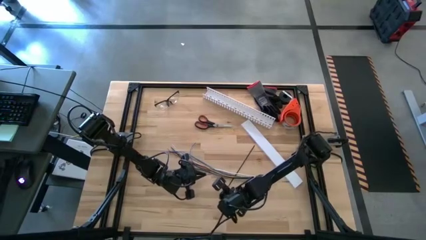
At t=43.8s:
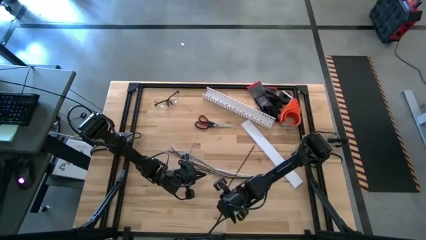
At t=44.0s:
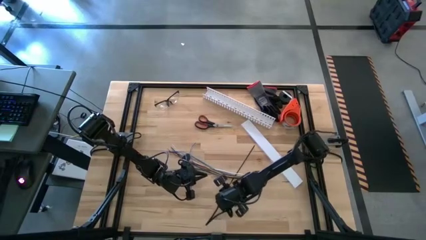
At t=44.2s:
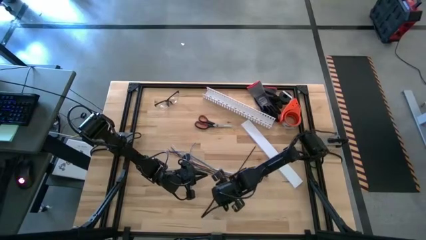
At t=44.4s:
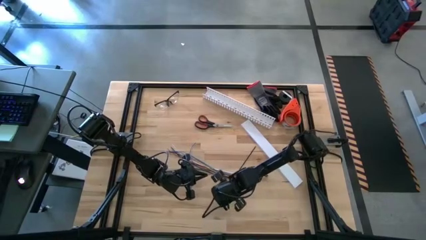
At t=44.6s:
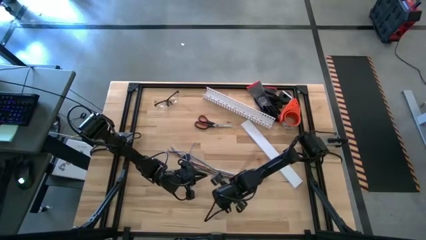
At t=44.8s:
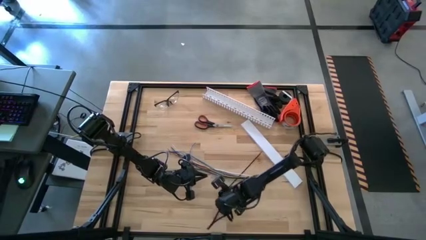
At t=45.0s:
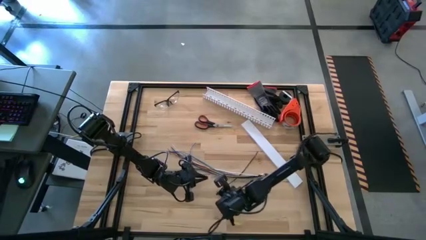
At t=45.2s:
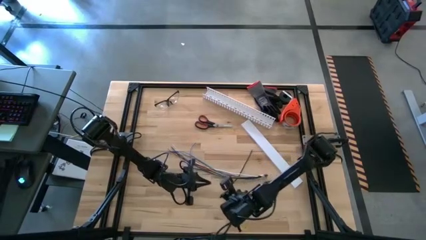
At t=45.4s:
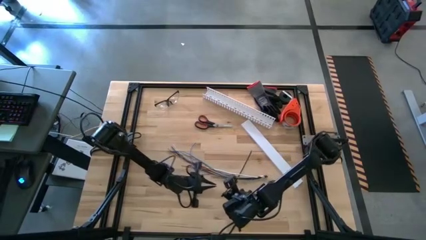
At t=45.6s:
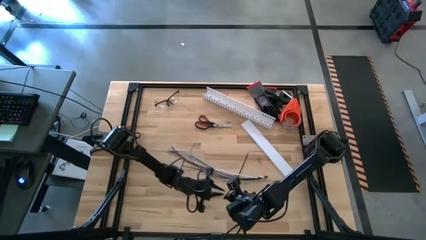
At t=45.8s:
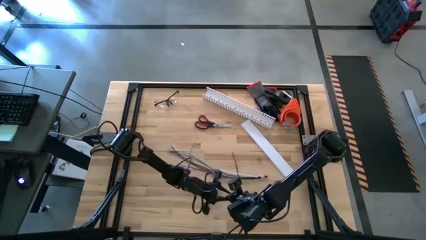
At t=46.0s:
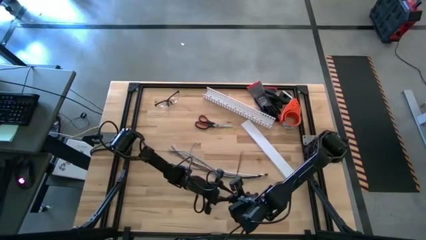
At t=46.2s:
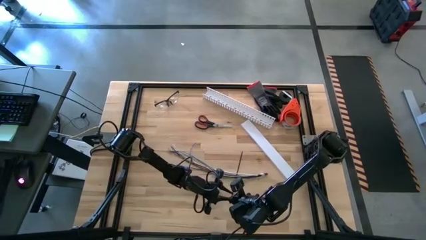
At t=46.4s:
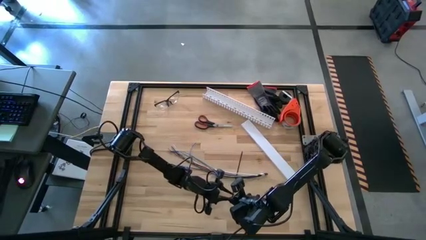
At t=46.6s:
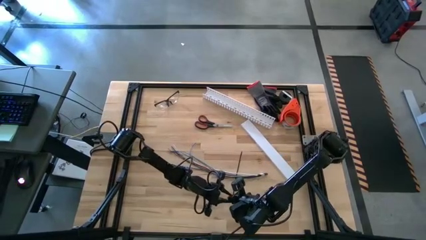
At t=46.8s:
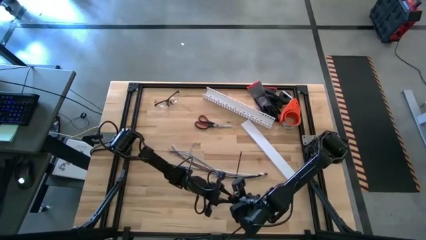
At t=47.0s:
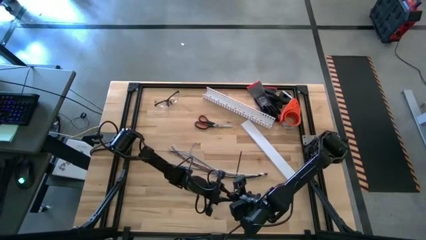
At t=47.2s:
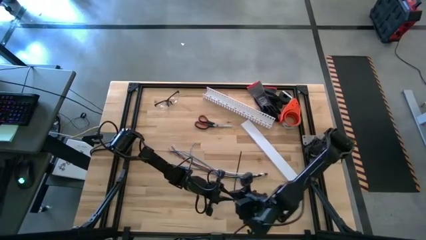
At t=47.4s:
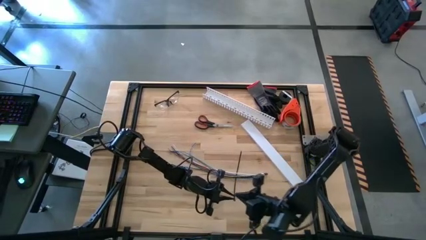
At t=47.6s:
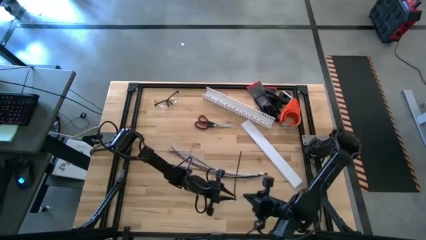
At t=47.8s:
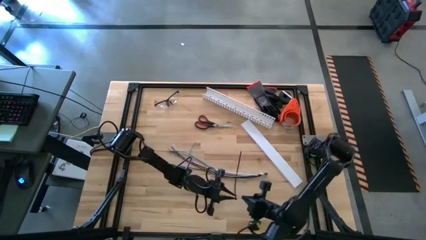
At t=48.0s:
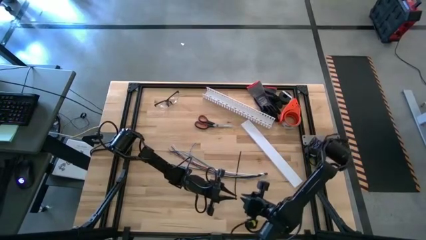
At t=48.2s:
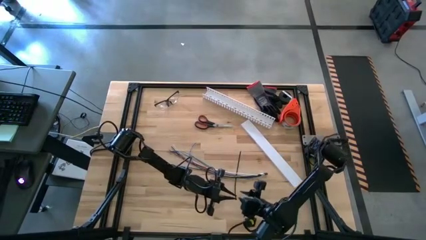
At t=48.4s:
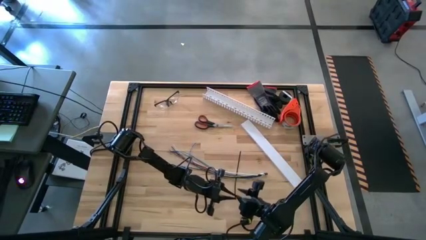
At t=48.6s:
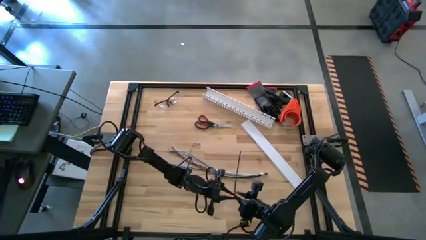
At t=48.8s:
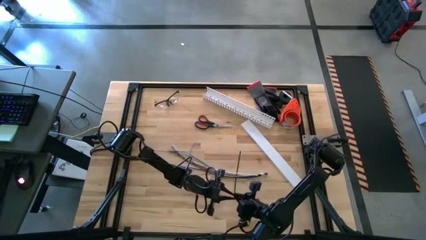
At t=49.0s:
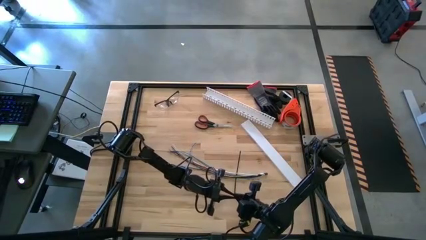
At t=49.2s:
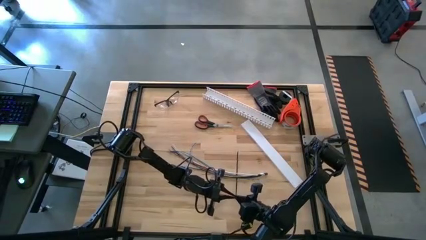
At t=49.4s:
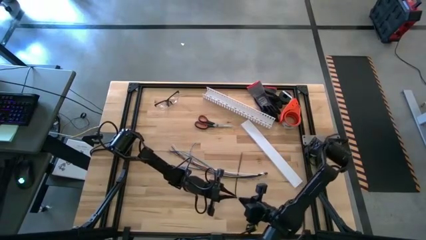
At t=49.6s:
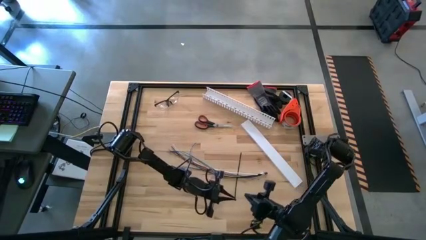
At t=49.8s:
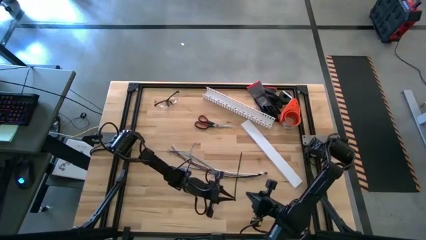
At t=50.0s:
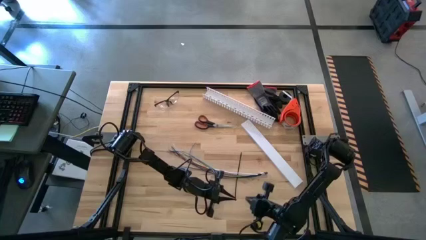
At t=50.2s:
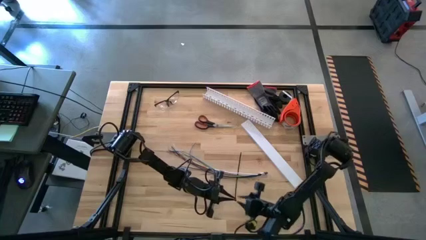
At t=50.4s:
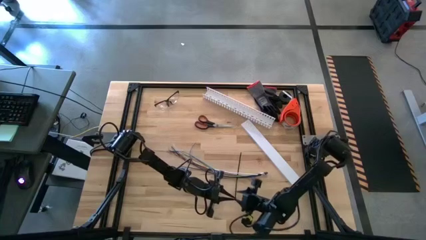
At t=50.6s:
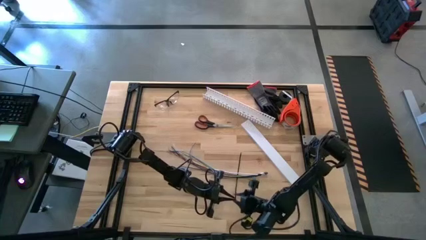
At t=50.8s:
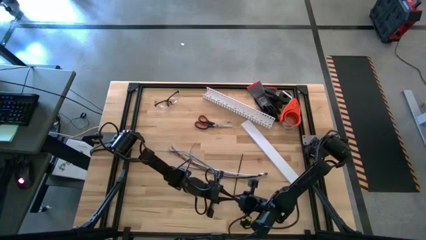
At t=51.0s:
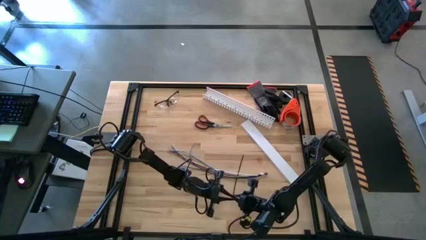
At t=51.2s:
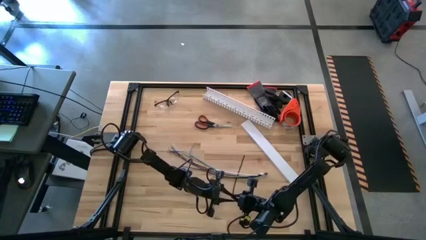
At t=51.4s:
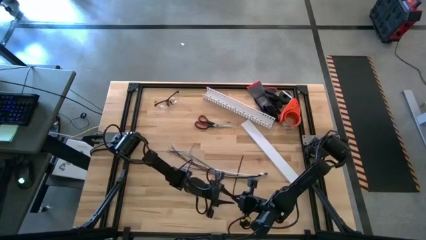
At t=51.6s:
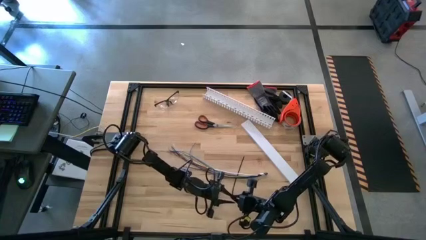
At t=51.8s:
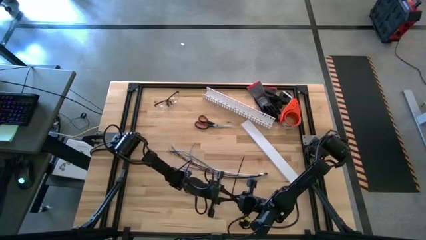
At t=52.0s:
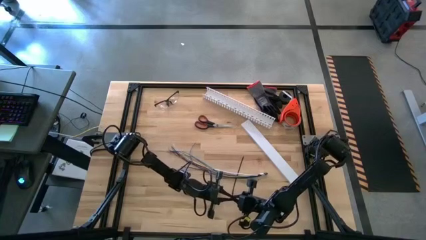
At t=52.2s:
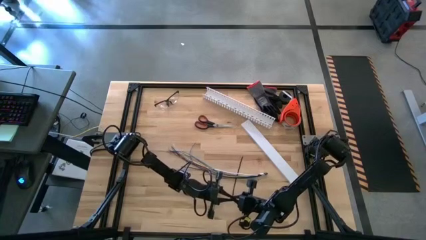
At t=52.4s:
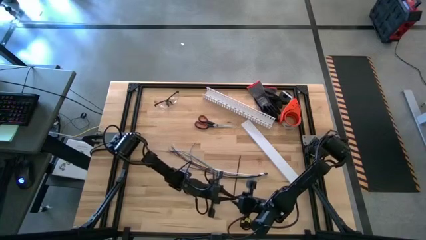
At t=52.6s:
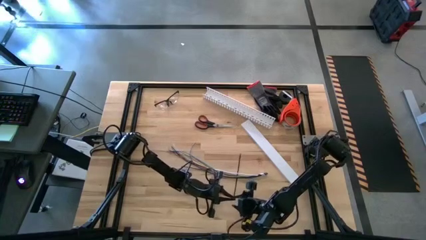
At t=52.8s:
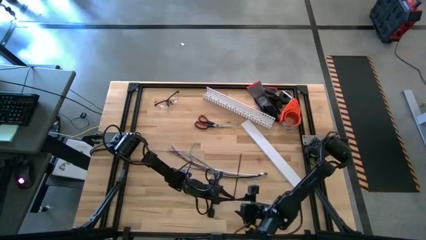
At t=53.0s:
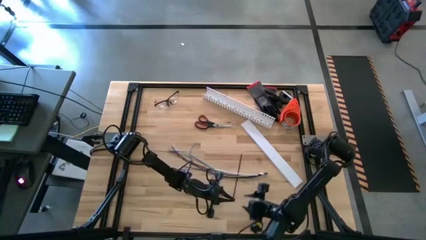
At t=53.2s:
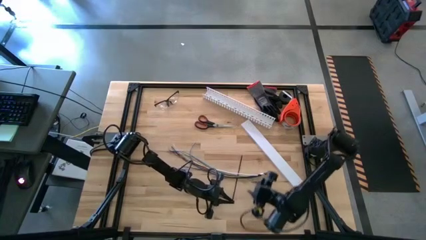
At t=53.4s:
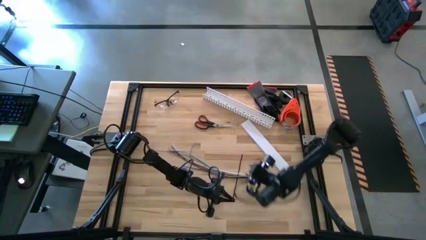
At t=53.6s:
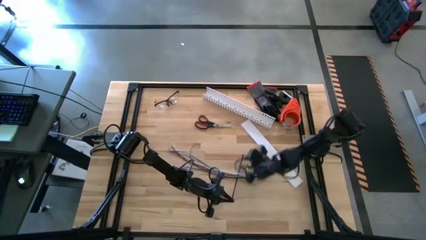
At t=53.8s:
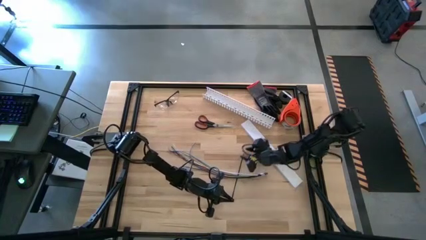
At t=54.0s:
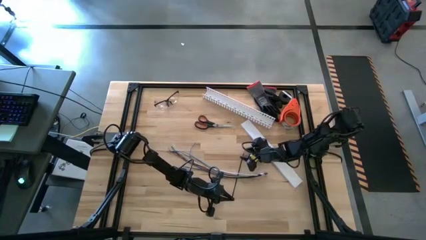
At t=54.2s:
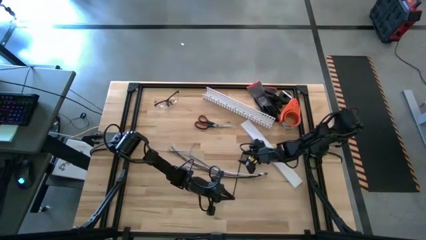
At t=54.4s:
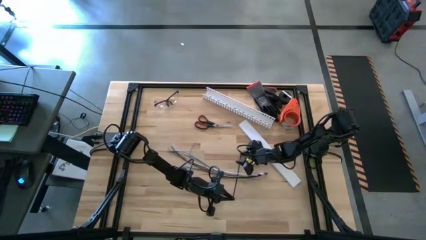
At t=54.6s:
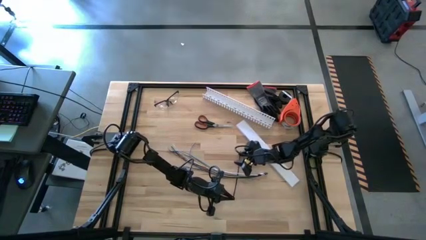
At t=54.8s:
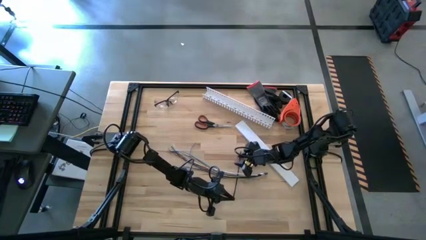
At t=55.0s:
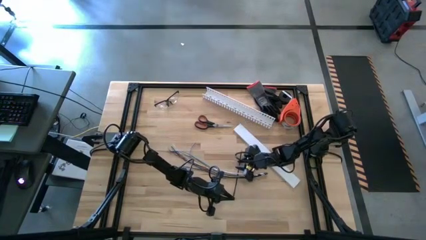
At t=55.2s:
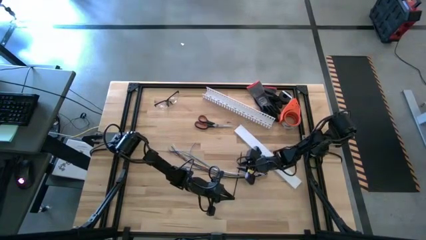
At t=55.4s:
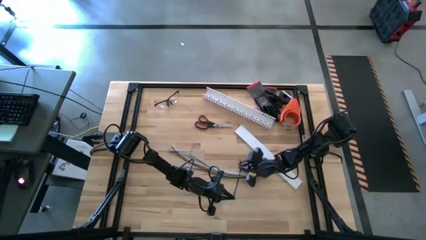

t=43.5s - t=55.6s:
Task: Ziptie cables
Wrap the cable wires with a black ziptie
